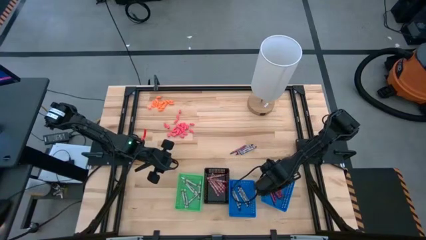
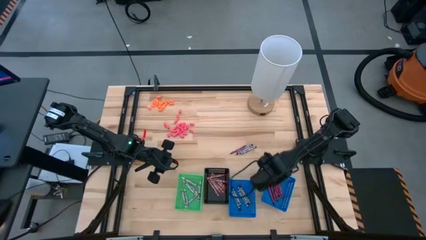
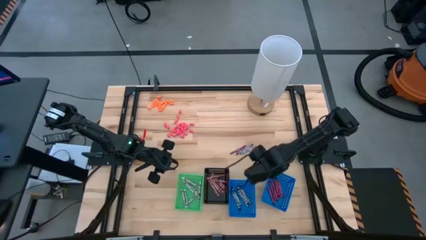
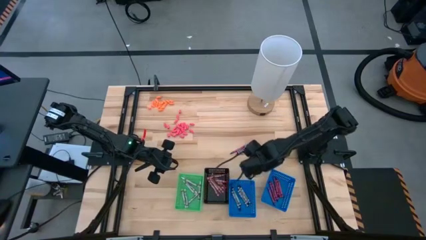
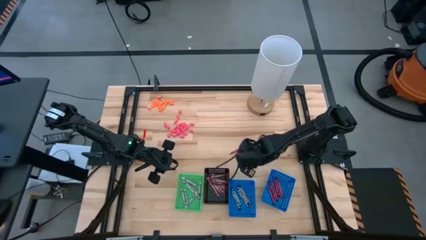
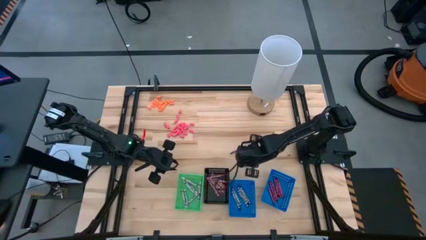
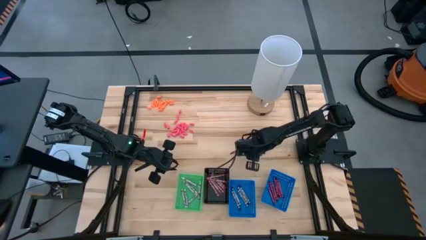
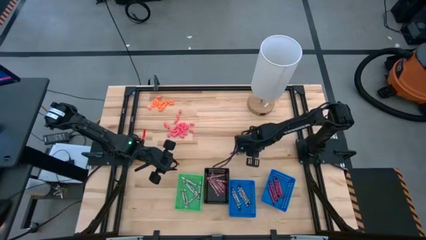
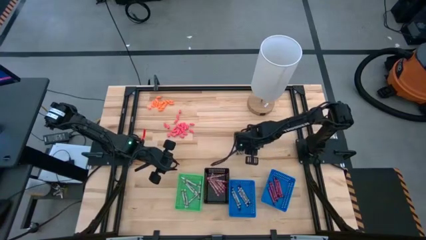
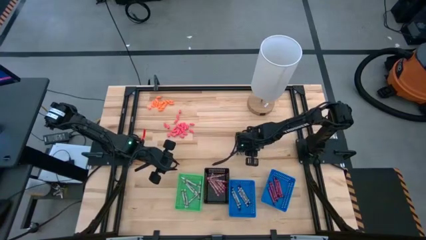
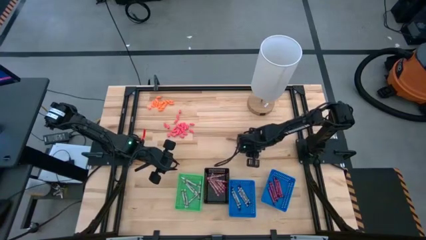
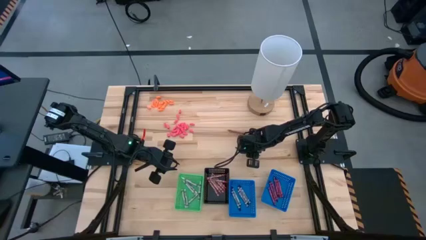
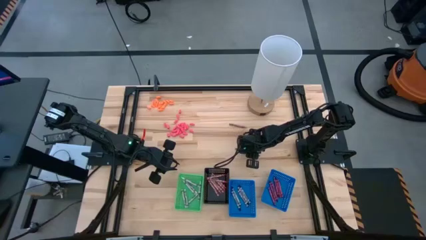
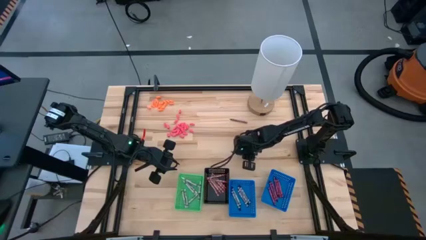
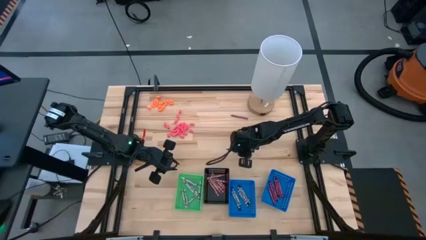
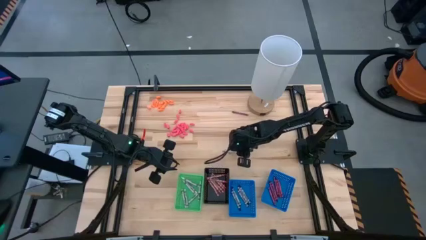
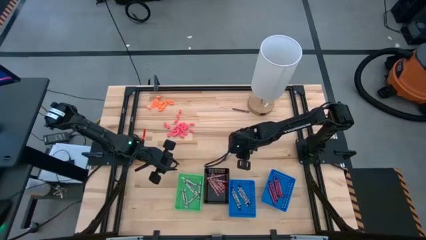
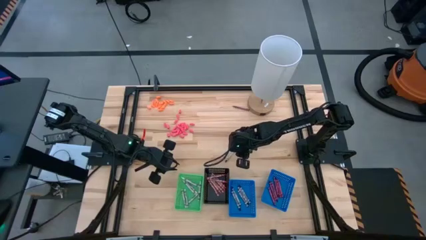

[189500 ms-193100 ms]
Task: Sort crayons
Put the black crayon into the left blue bin

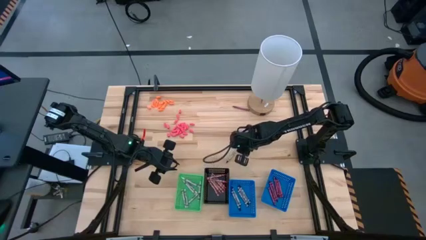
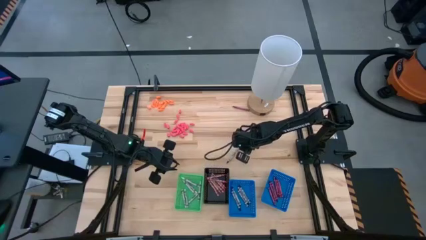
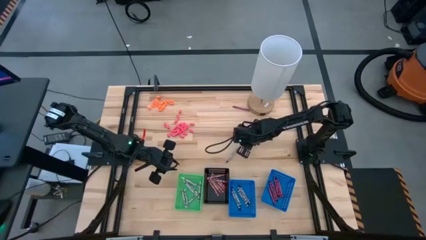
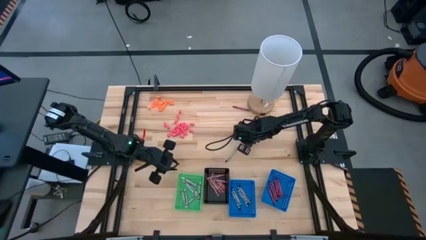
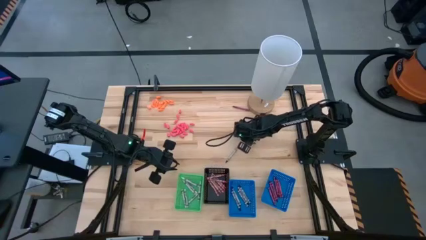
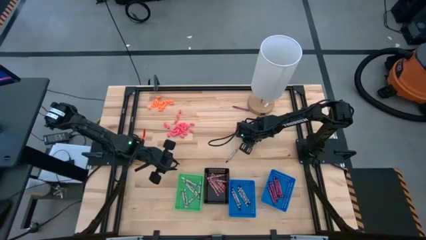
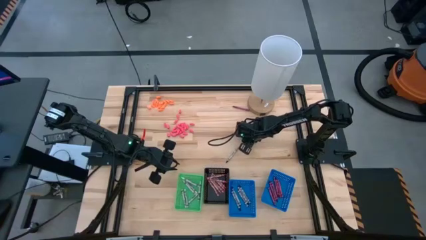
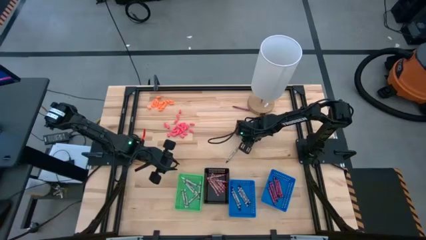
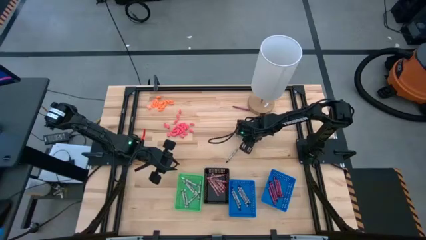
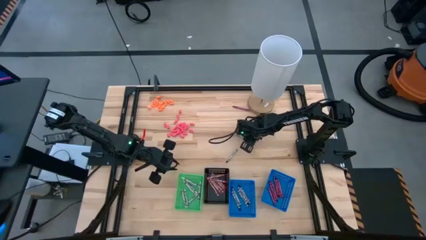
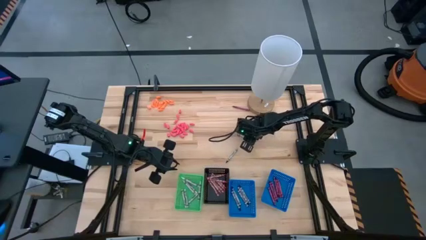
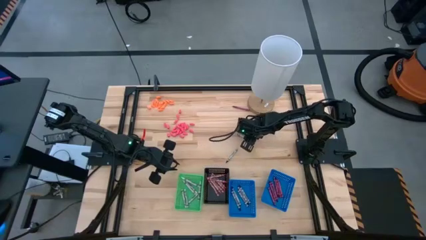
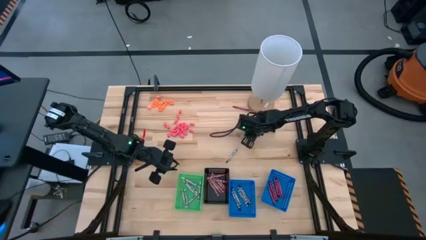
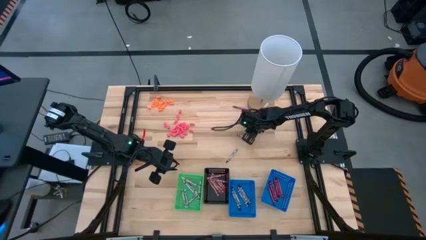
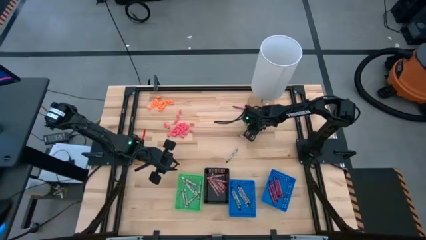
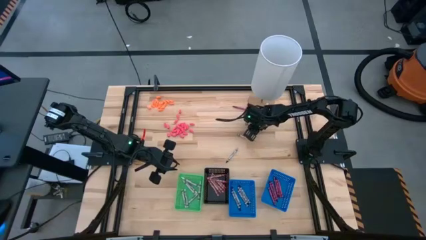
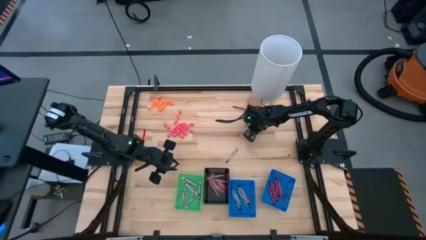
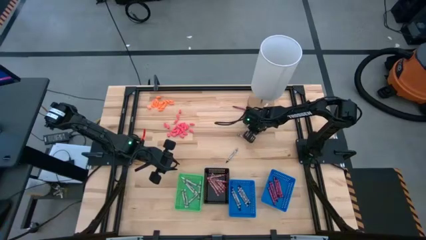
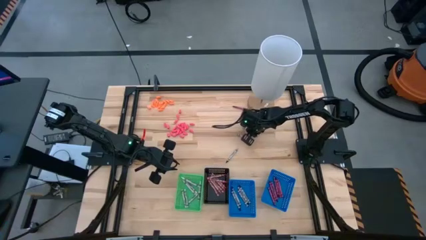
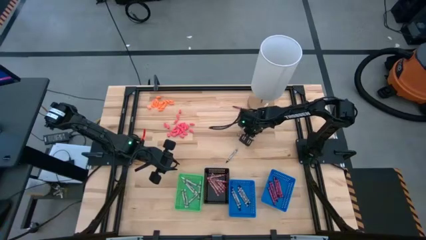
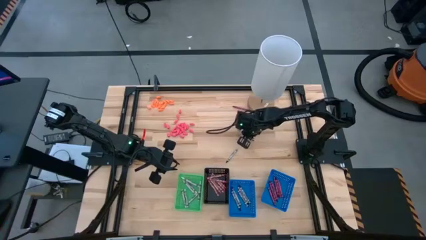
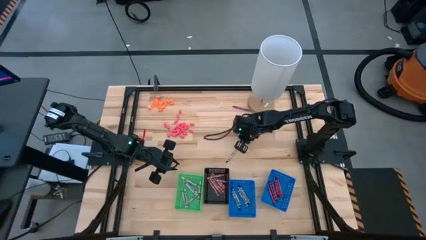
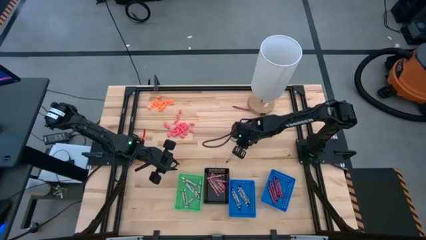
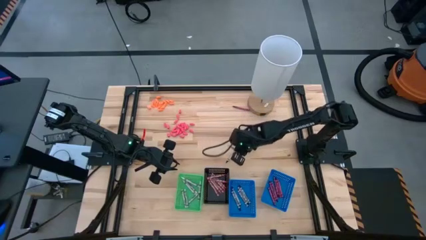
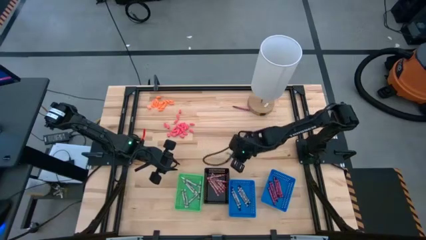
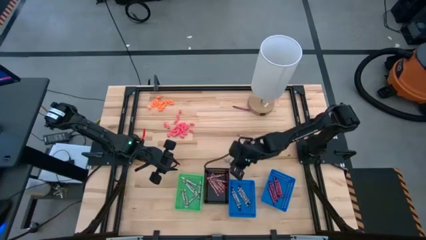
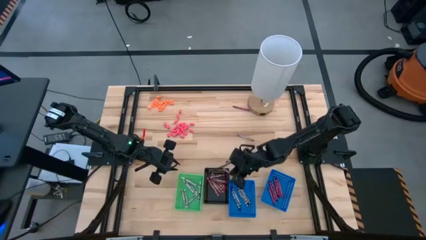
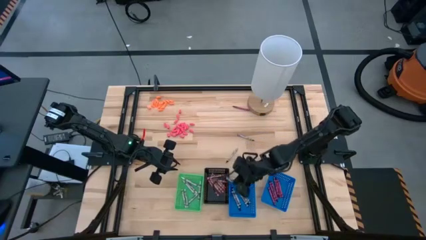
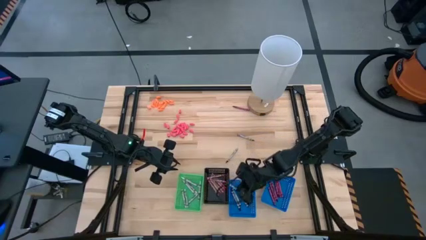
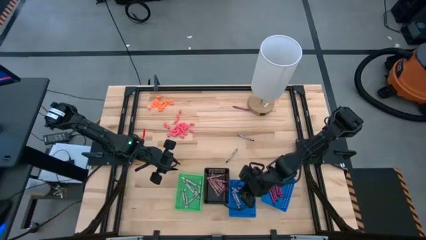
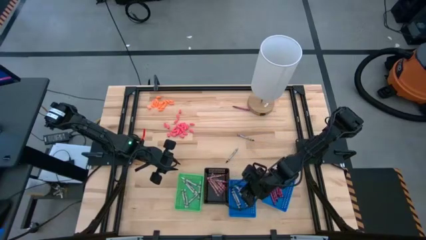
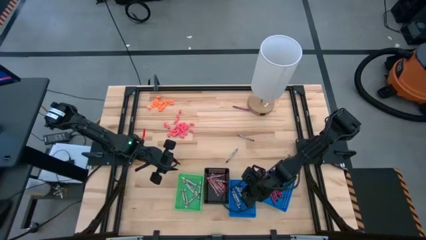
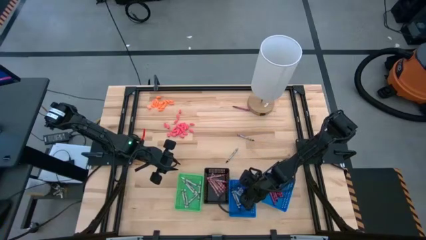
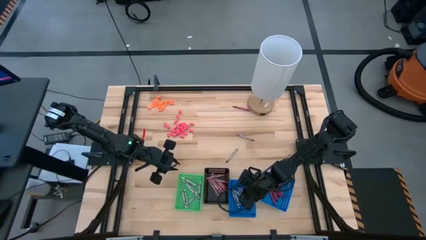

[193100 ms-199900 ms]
Put the black crayon into the left blue bin

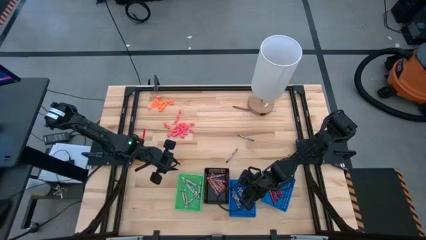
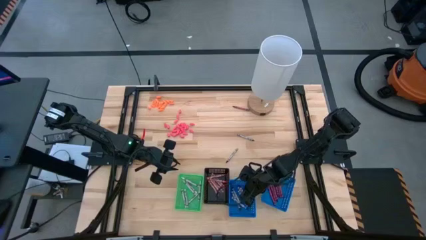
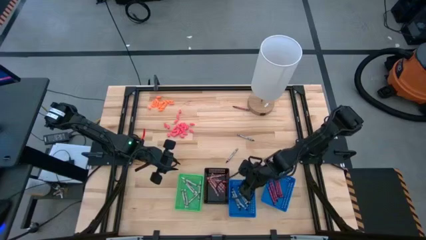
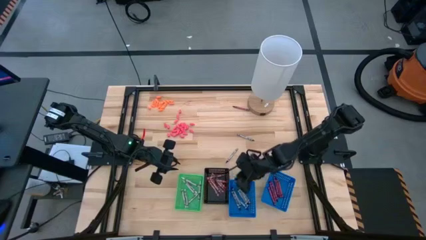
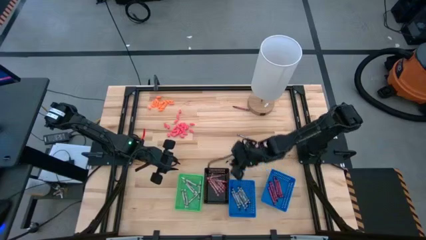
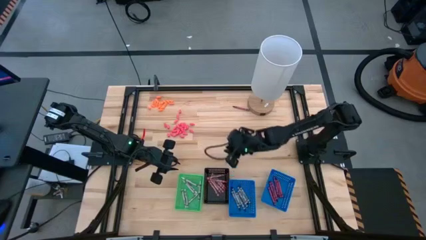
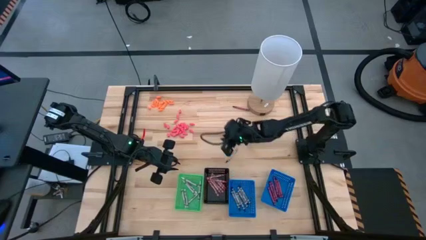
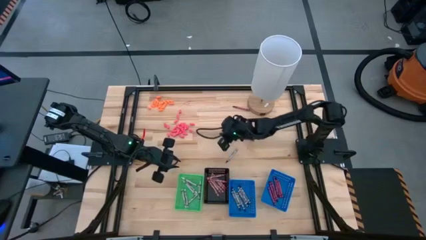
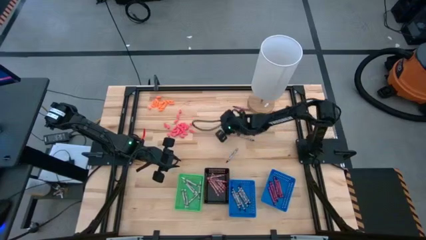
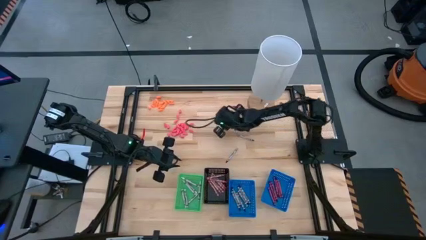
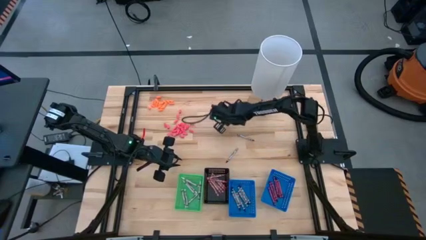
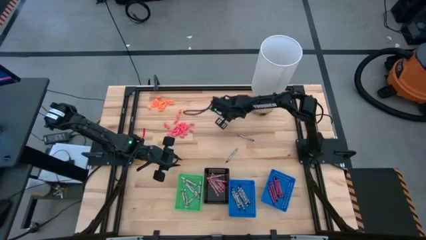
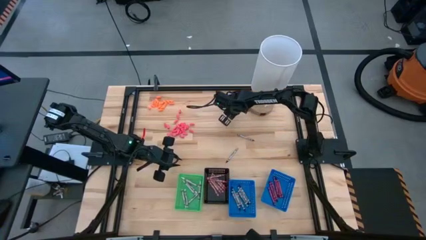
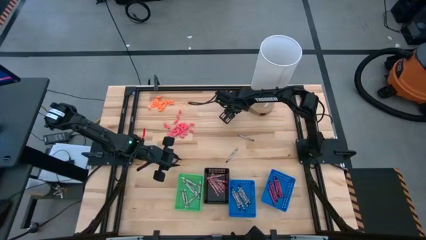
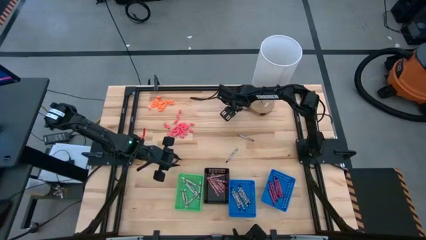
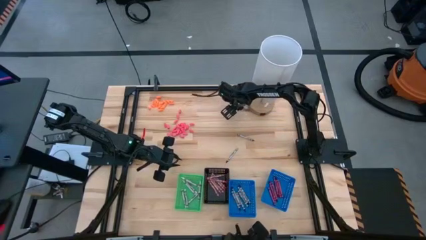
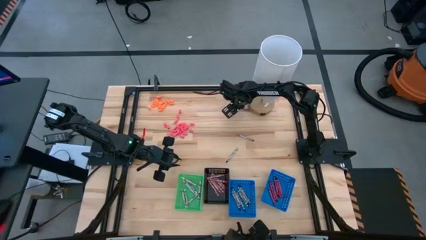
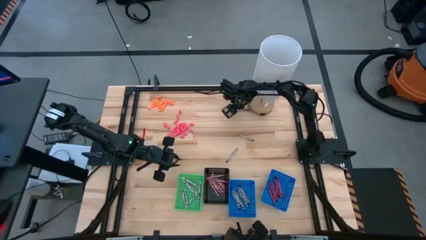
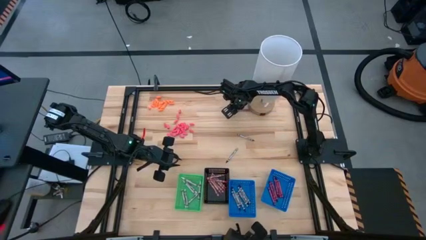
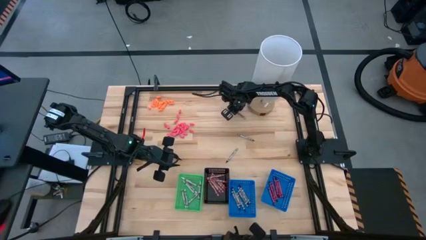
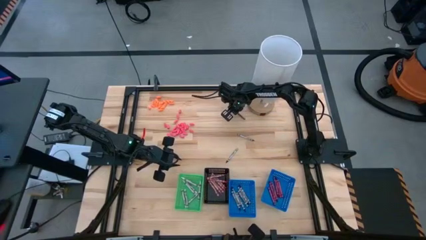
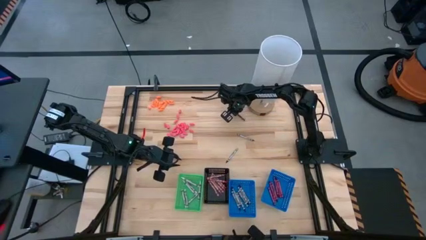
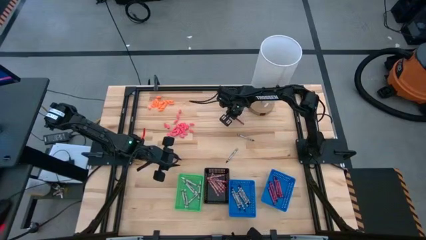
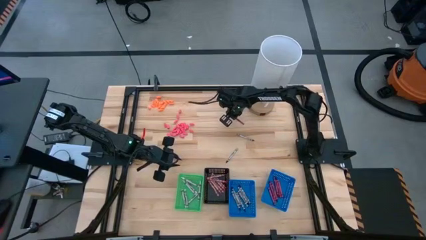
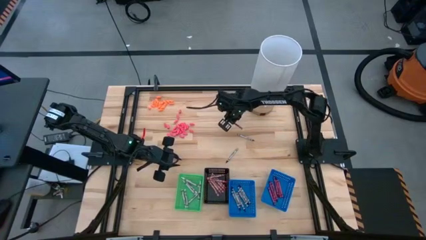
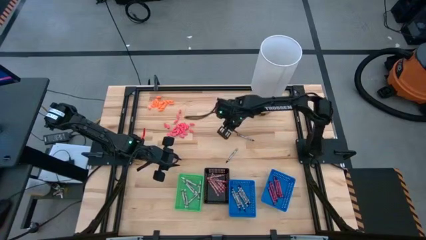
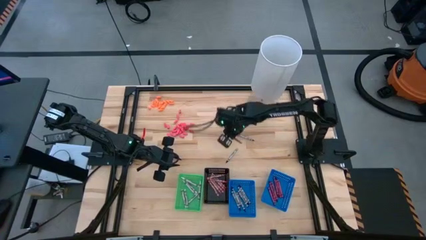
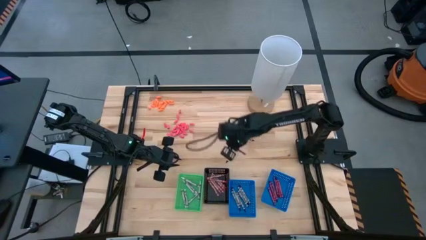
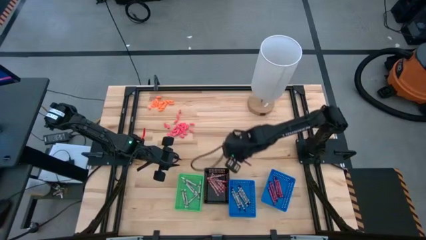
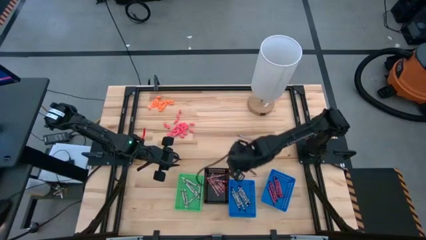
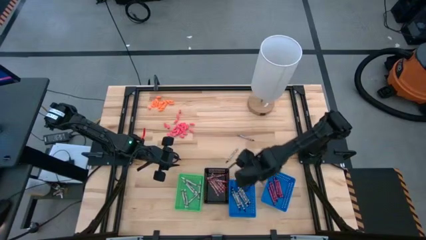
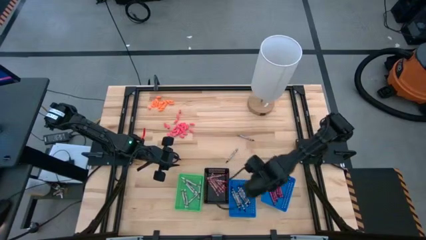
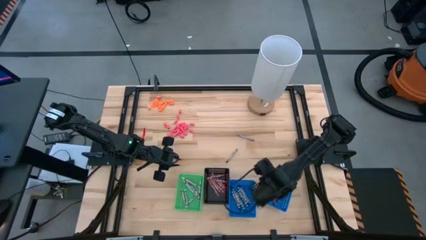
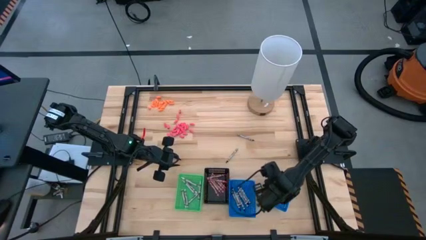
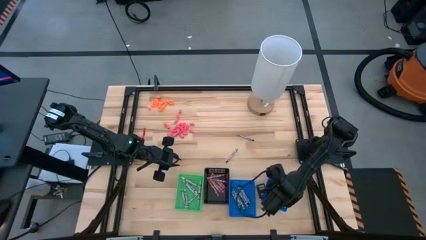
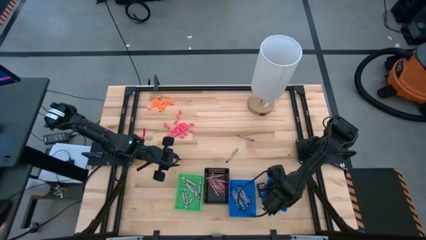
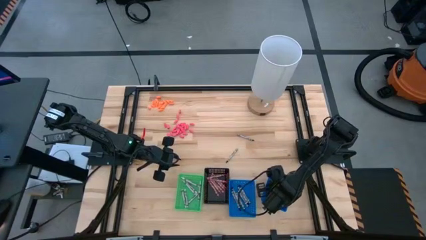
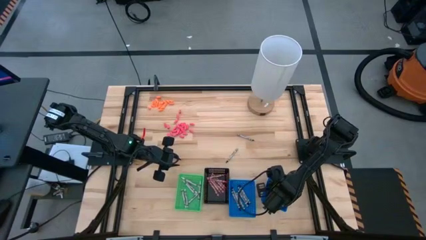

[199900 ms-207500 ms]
Put the red crayon into the right blue bin
